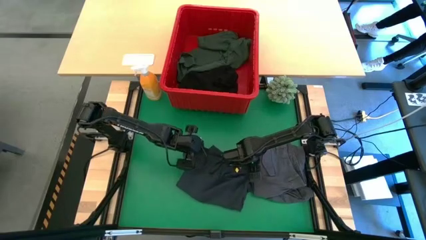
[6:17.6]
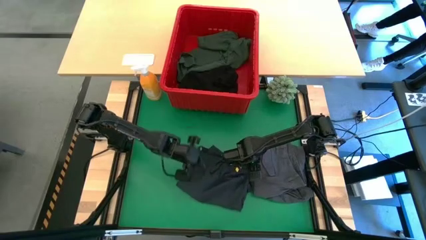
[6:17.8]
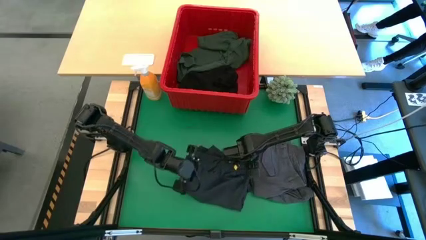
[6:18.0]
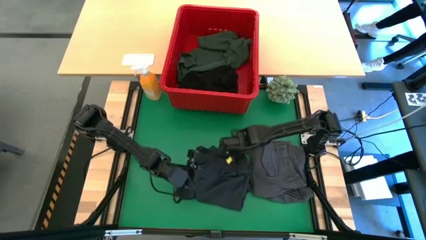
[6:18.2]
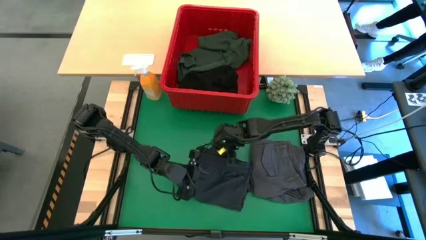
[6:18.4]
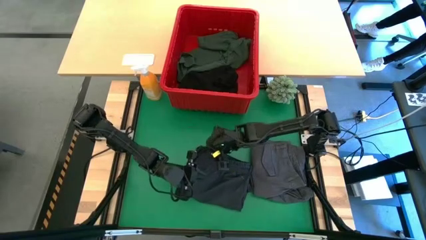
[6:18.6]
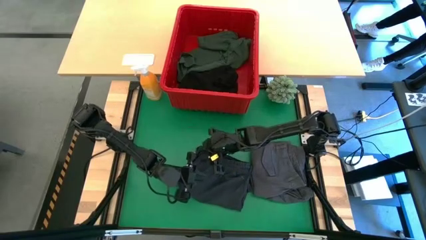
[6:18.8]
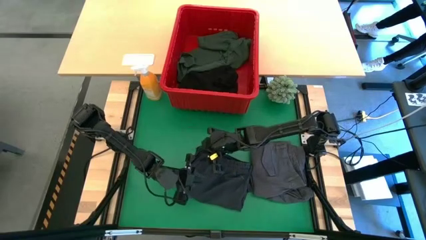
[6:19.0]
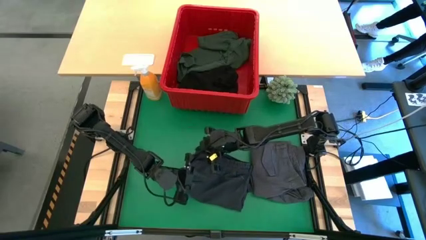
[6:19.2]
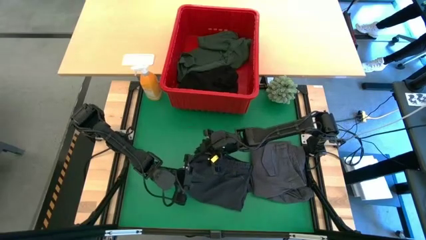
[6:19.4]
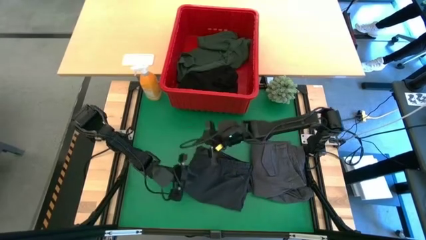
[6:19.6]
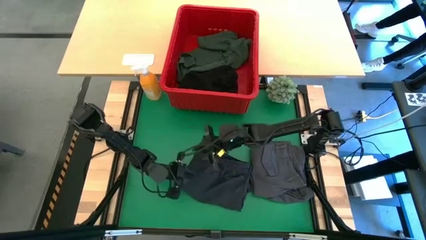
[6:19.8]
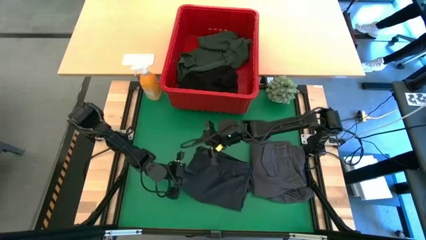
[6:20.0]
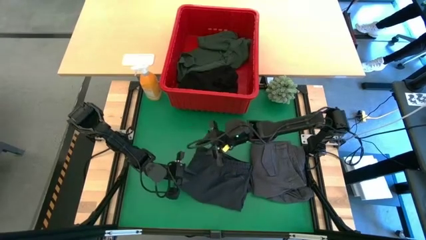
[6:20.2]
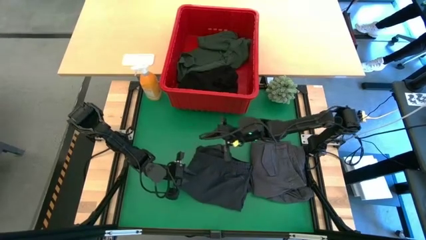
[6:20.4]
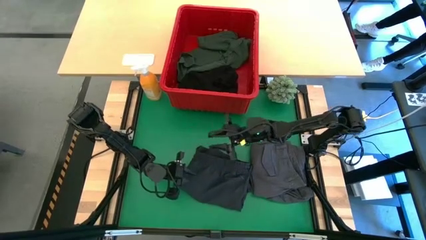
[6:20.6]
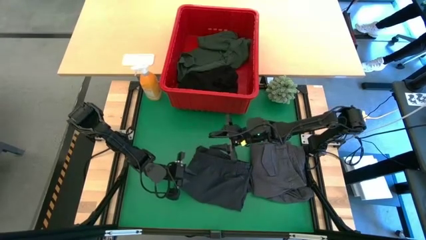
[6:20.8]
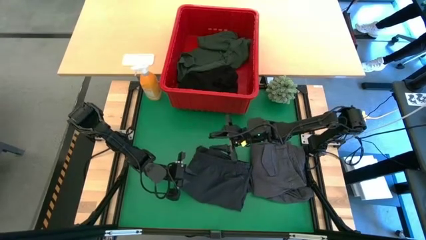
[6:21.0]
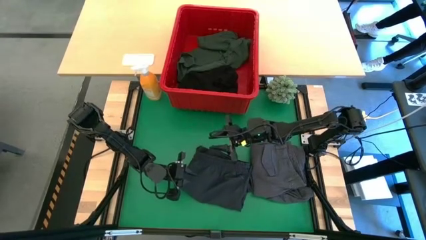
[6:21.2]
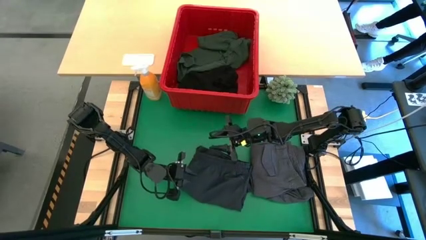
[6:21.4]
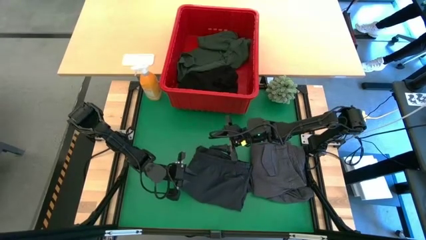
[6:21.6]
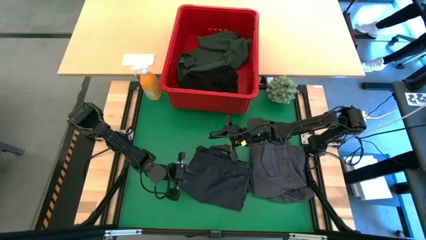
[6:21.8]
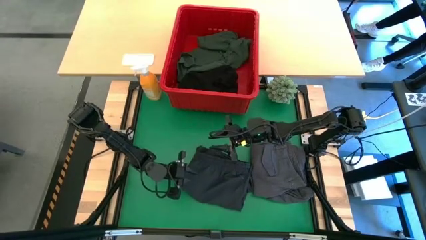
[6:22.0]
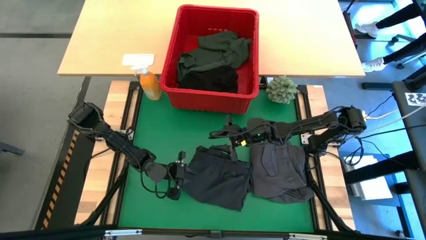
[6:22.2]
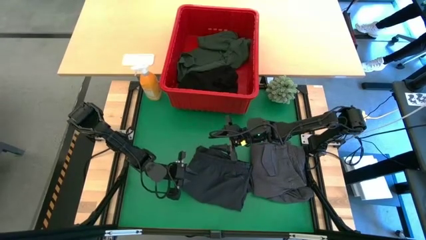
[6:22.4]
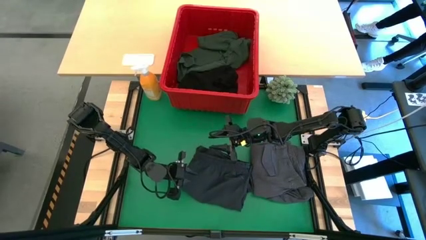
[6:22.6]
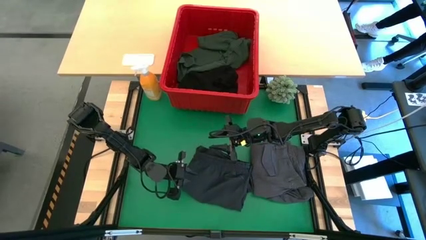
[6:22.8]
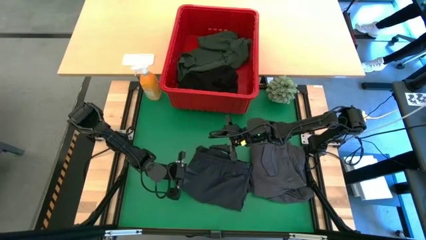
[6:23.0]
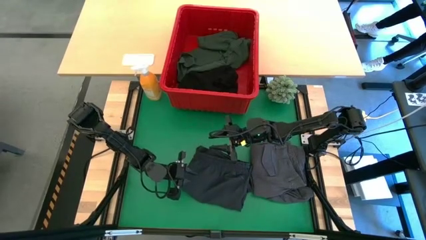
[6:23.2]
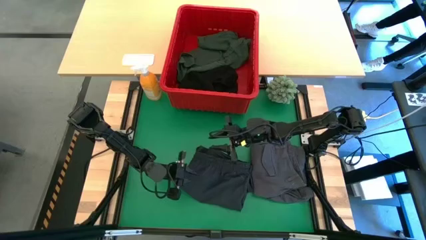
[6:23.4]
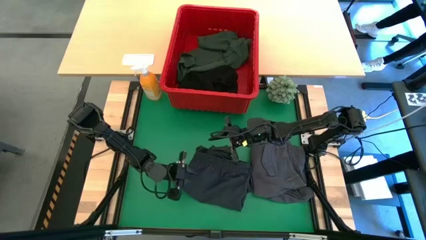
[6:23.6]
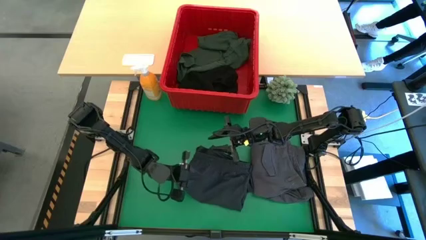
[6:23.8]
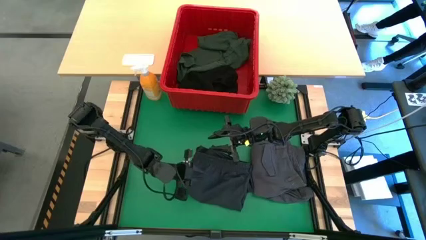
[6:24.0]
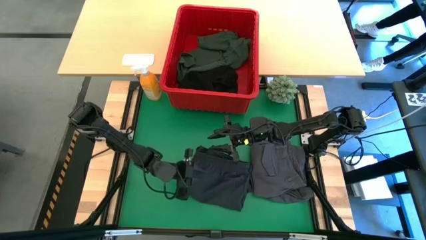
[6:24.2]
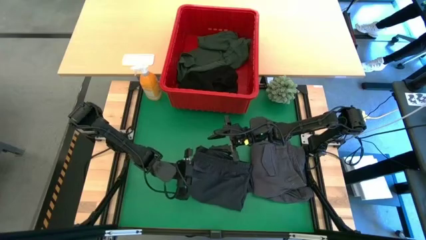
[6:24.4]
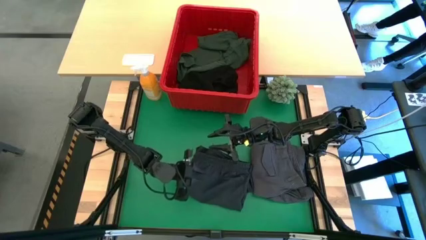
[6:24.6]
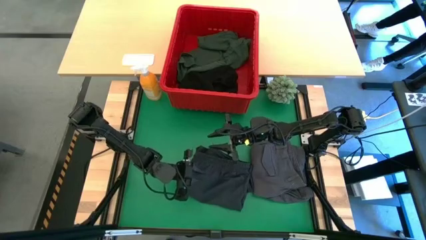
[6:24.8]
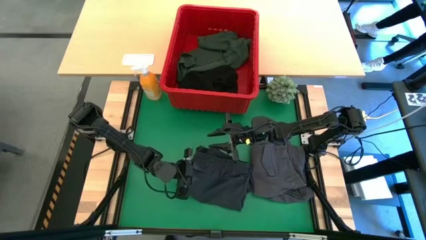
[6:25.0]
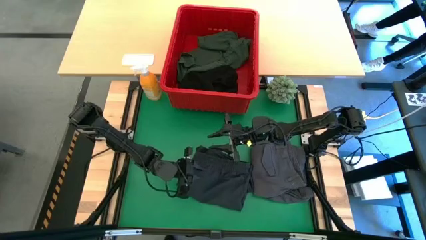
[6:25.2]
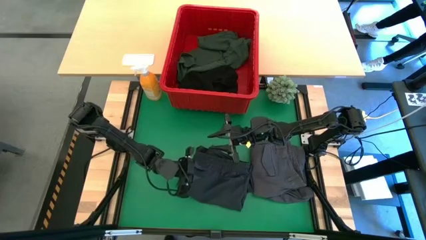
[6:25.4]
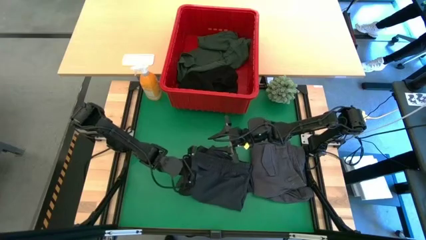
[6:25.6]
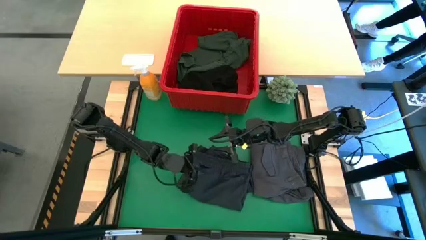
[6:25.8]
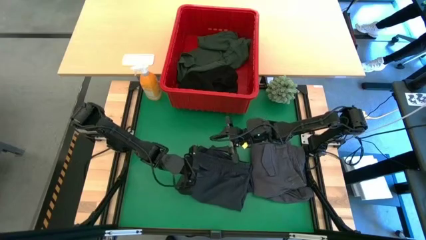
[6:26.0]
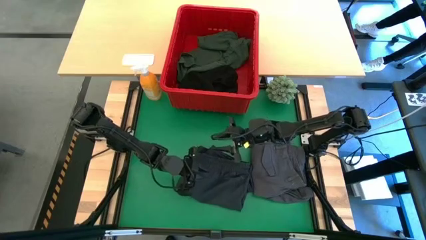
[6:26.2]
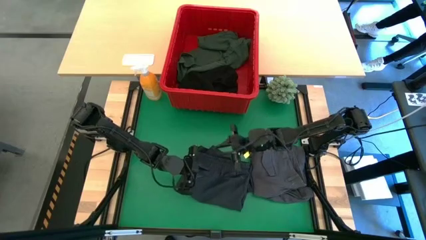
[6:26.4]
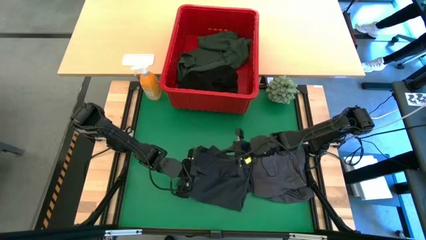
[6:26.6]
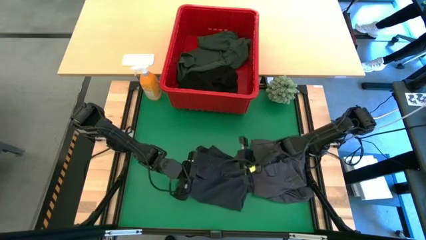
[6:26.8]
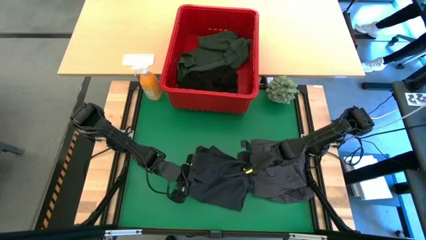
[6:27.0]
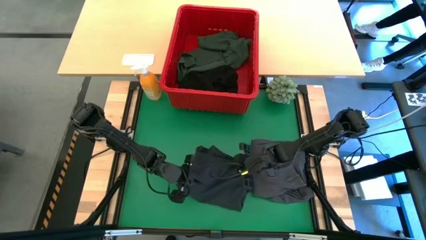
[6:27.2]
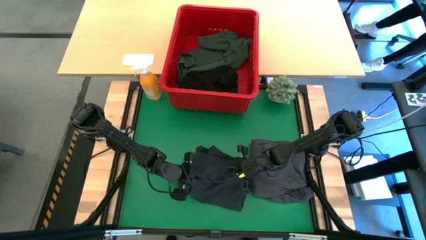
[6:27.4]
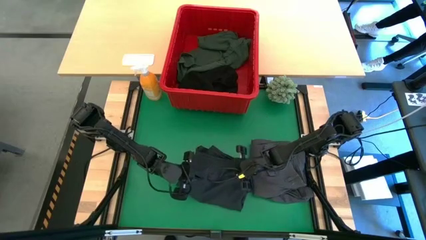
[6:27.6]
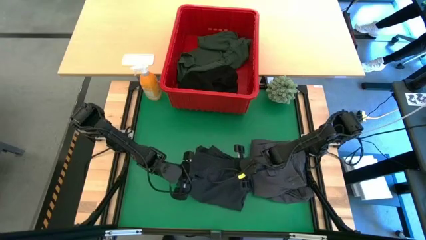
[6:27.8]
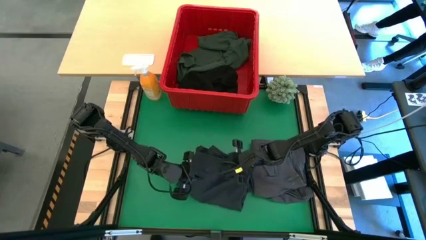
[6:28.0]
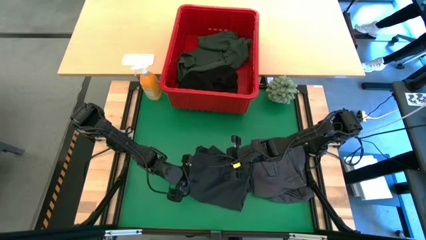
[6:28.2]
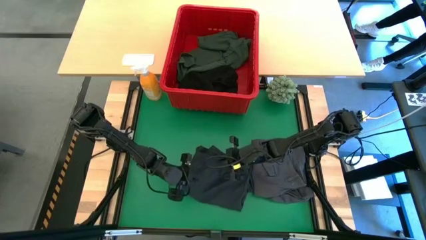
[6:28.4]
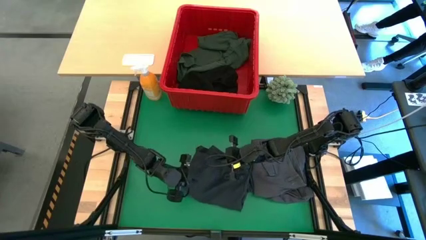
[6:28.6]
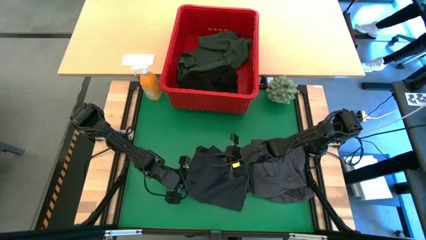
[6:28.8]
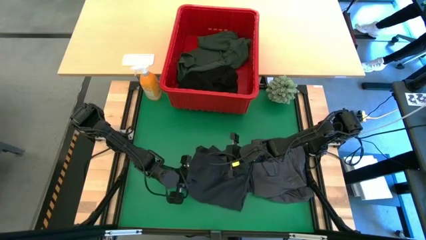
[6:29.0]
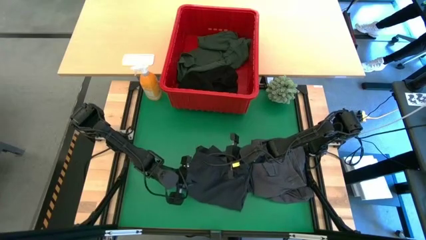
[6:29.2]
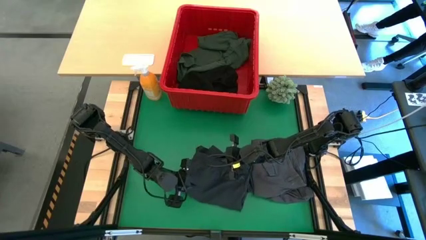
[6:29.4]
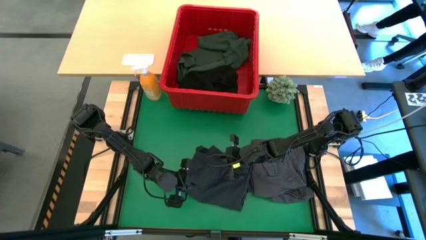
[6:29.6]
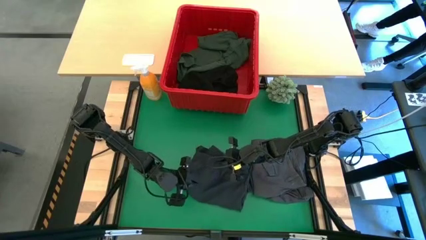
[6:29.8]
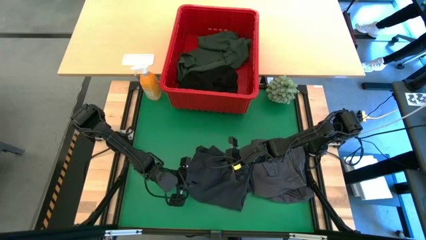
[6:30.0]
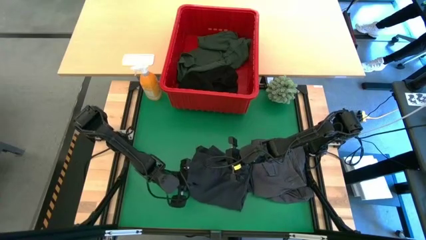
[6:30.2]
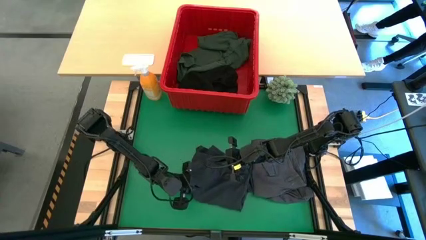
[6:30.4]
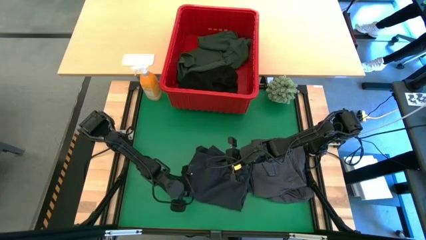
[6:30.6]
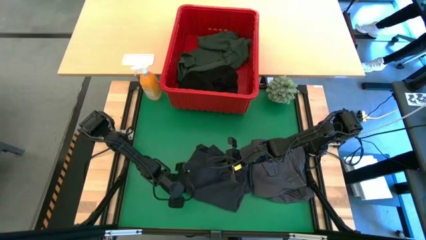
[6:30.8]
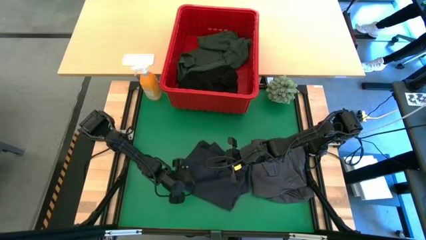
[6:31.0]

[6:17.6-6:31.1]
Task: Fold Laundry from Bin
Stack the dark gray short on top of gray short

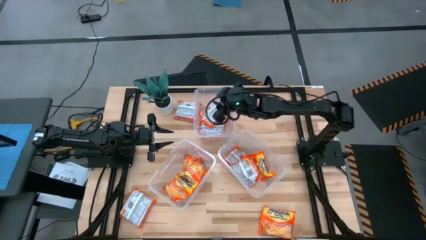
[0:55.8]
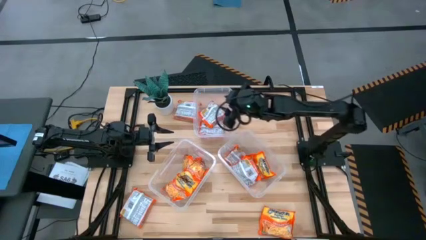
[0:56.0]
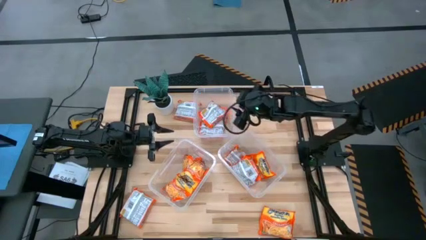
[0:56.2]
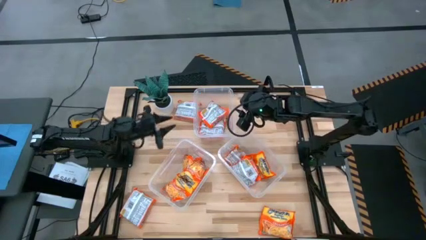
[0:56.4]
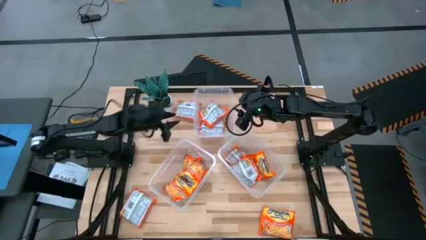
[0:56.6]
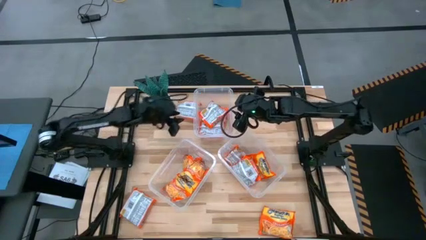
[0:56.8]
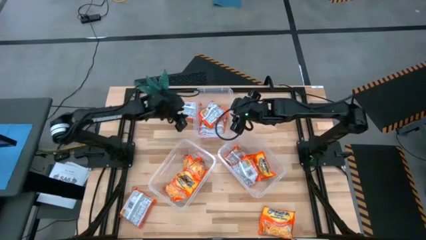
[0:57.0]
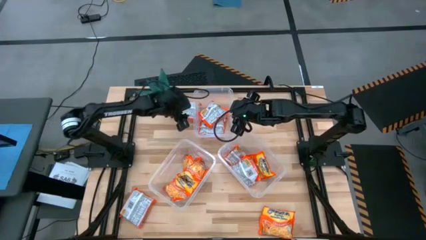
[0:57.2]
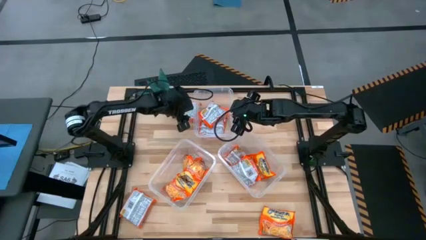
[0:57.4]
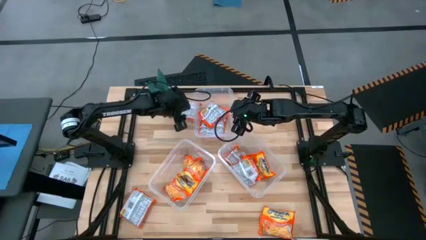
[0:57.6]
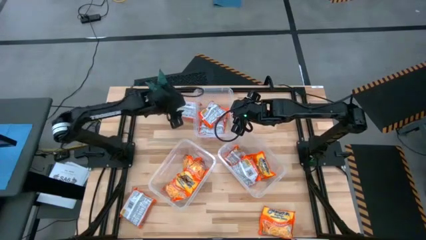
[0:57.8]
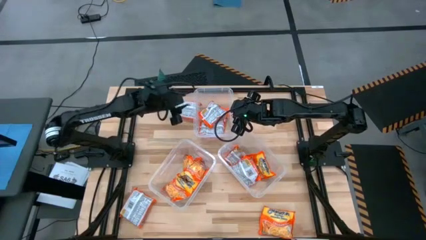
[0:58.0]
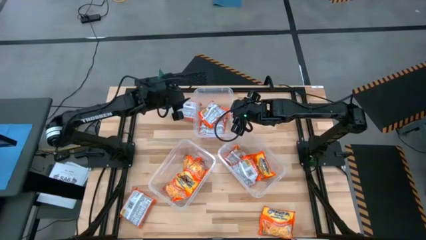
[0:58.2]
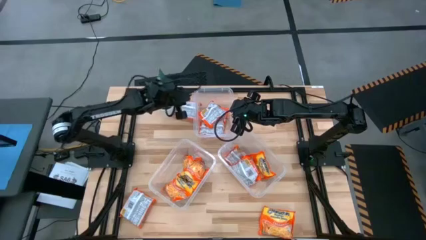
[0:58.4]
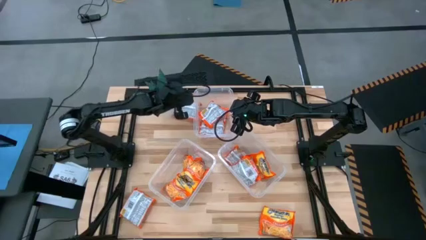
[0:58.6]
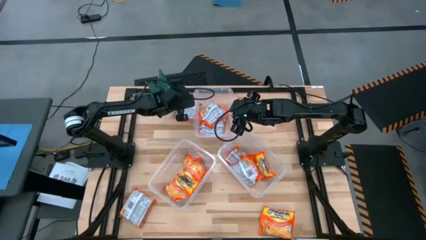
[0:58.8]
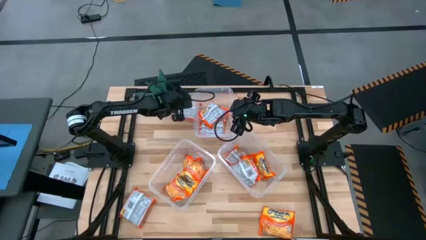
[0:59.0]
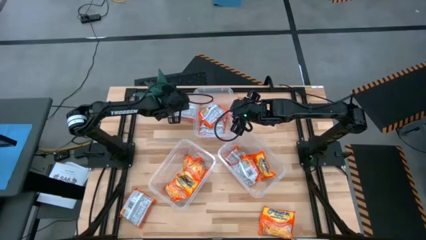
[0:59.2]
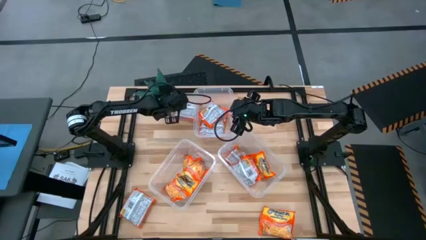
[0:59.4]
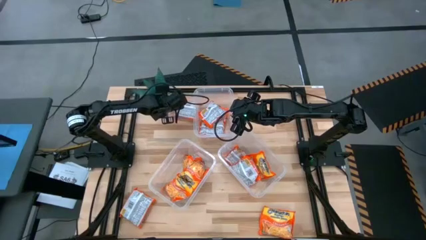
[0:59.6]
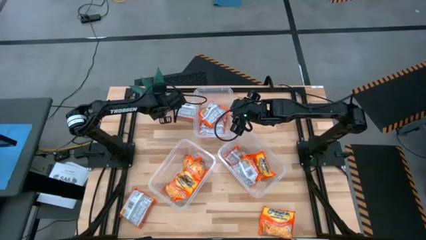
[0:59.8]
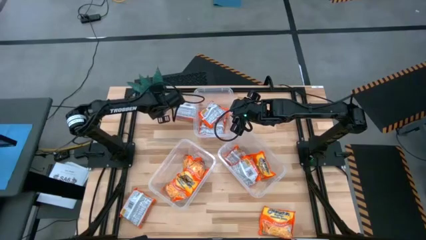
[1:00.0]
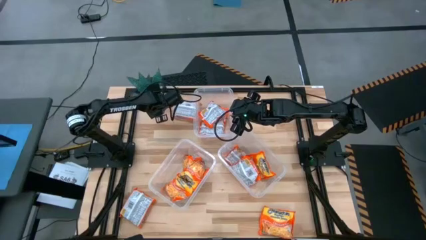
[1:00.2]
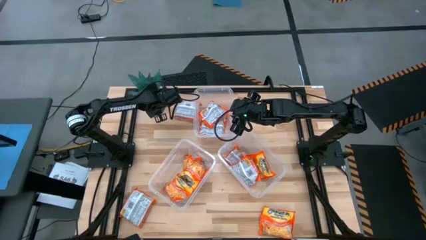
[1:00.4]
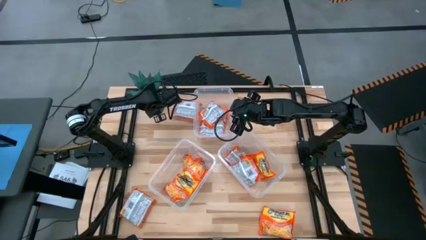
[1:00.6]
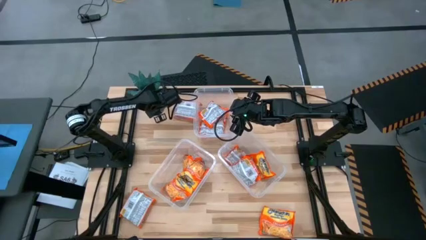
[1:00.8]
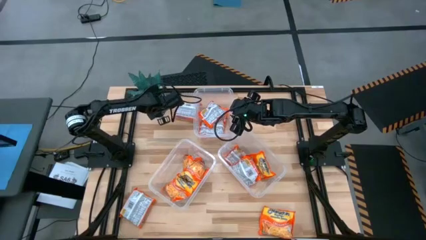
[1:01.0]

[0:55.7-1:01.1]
Task: Sort Maruchan noodles
Adjust the plant on the table
